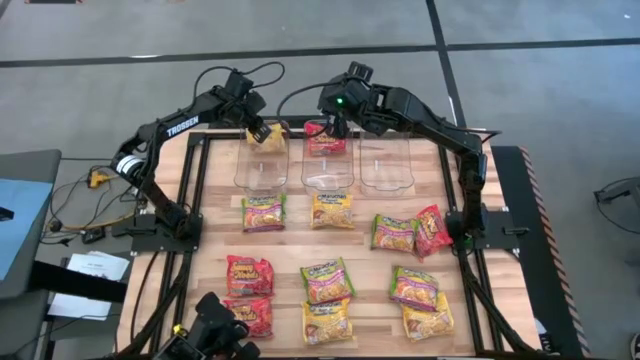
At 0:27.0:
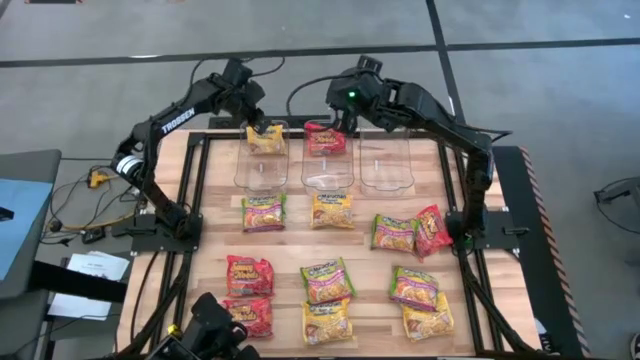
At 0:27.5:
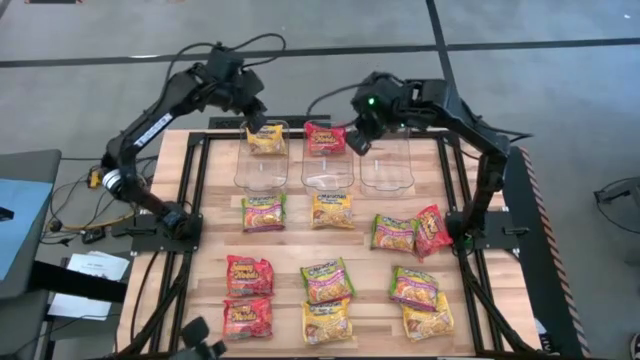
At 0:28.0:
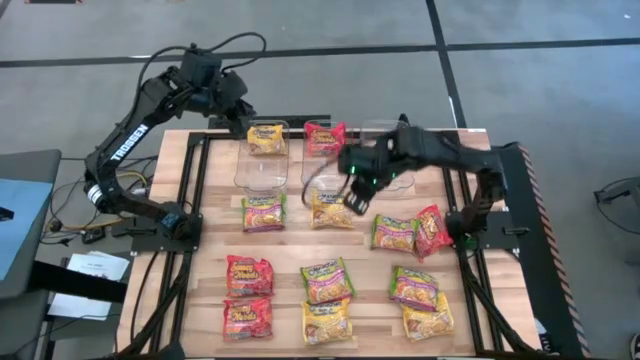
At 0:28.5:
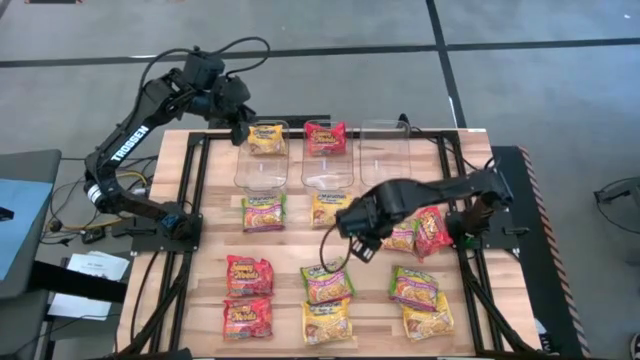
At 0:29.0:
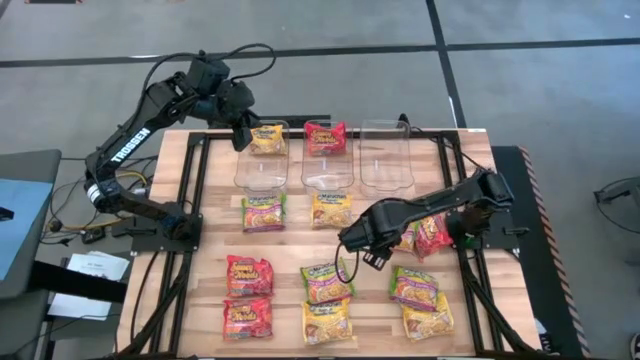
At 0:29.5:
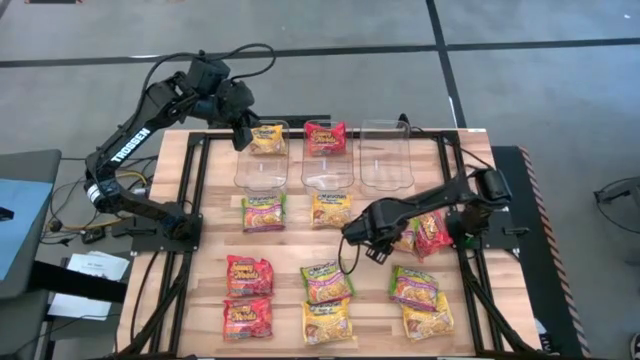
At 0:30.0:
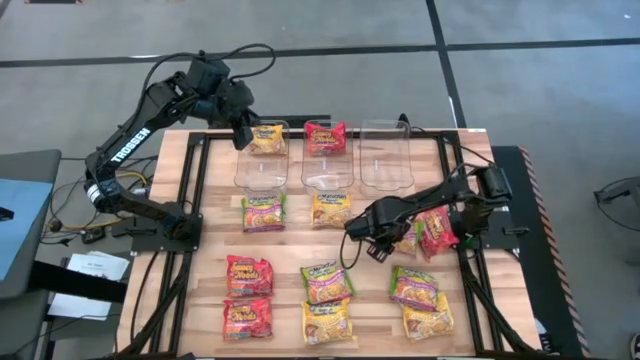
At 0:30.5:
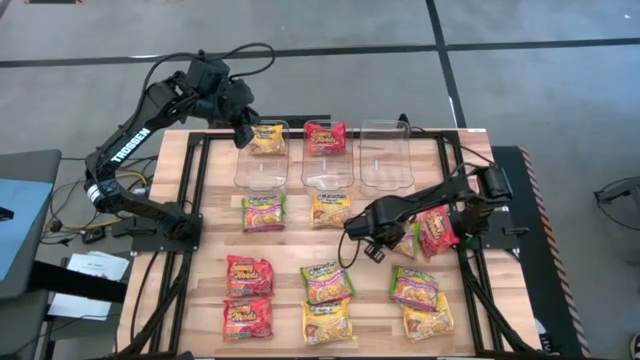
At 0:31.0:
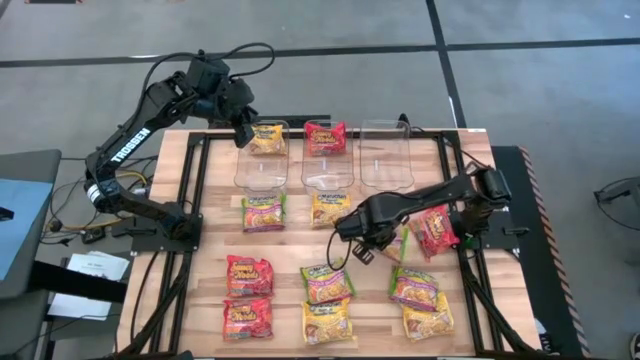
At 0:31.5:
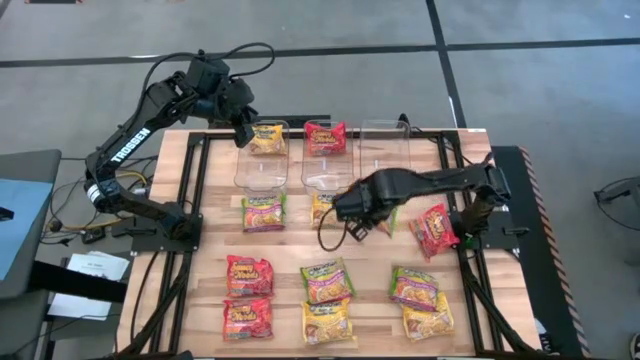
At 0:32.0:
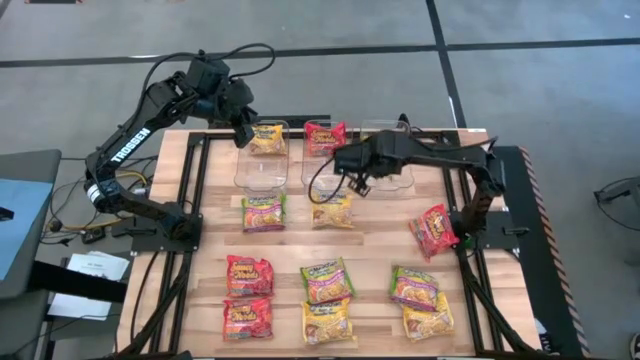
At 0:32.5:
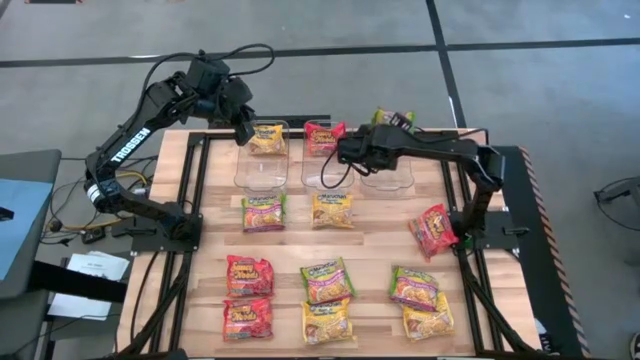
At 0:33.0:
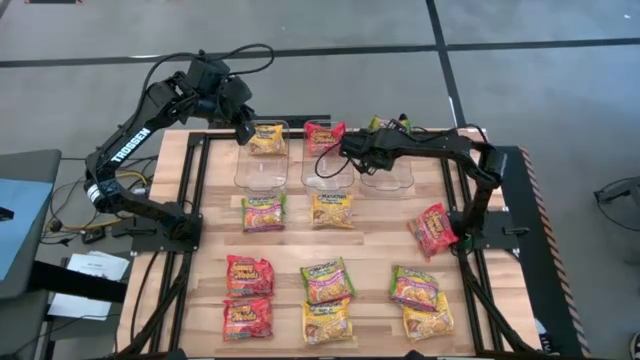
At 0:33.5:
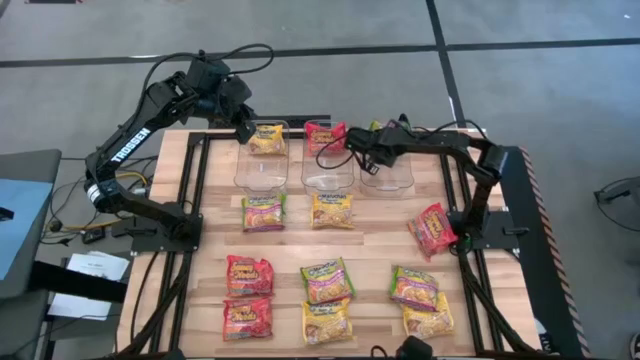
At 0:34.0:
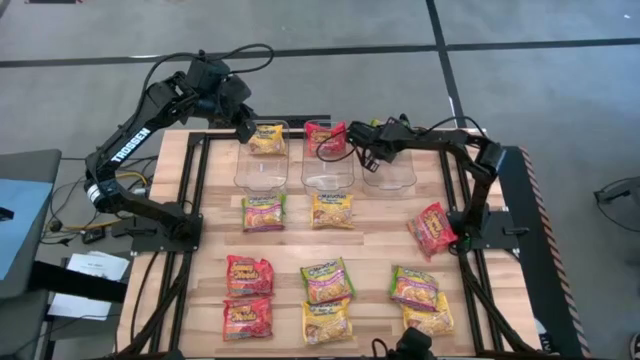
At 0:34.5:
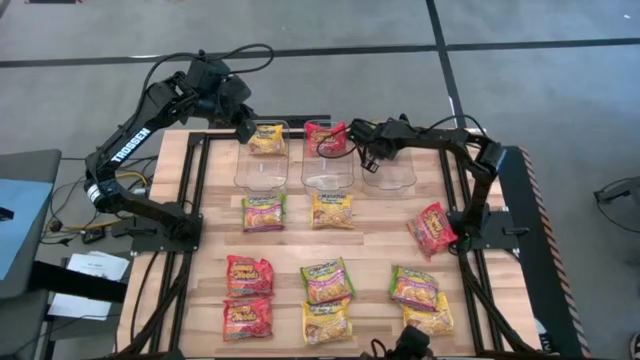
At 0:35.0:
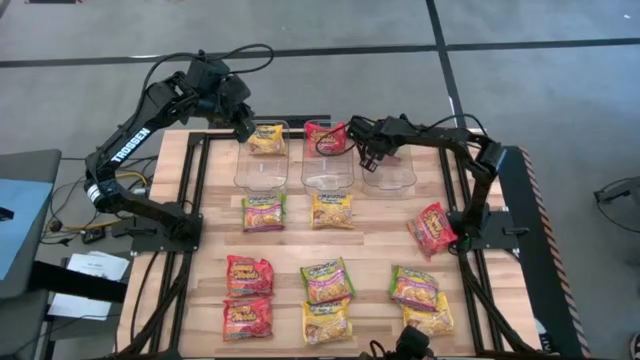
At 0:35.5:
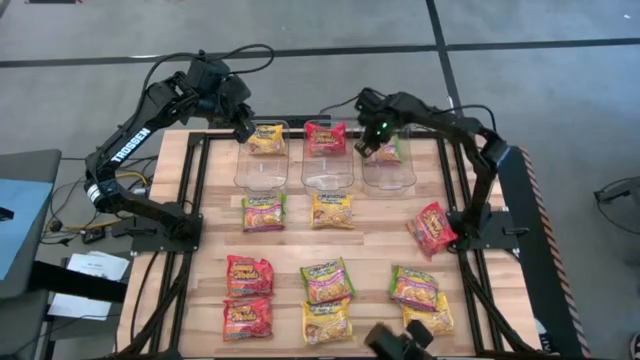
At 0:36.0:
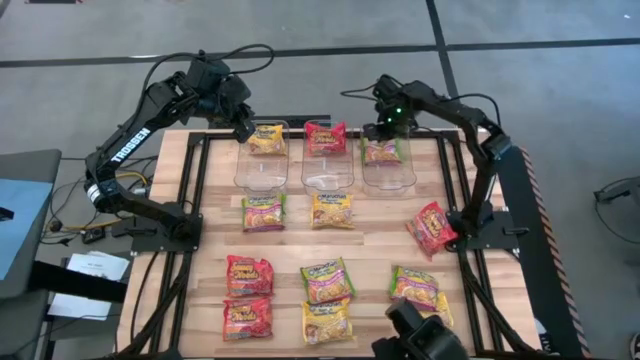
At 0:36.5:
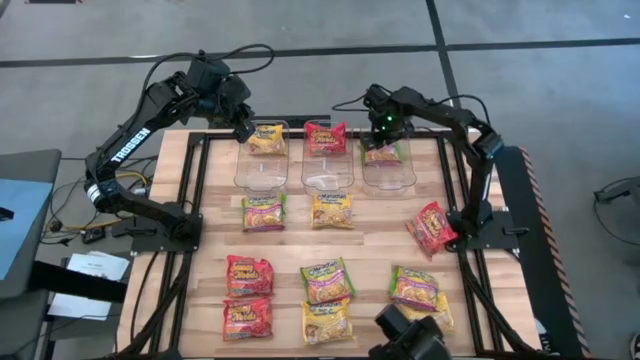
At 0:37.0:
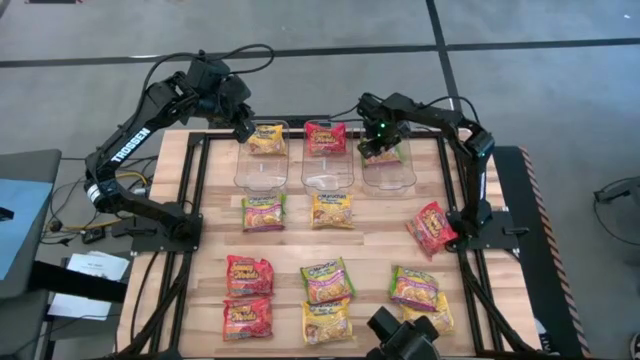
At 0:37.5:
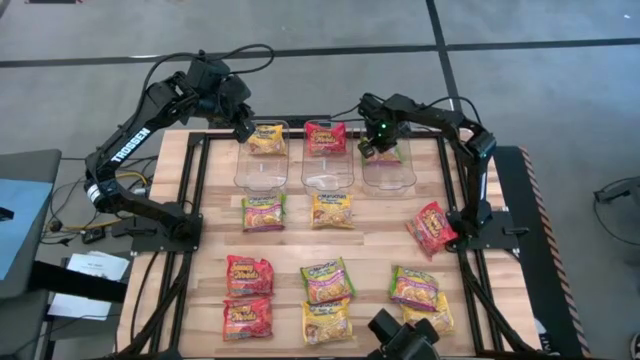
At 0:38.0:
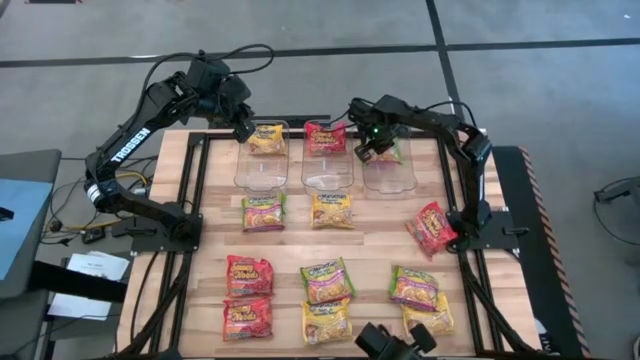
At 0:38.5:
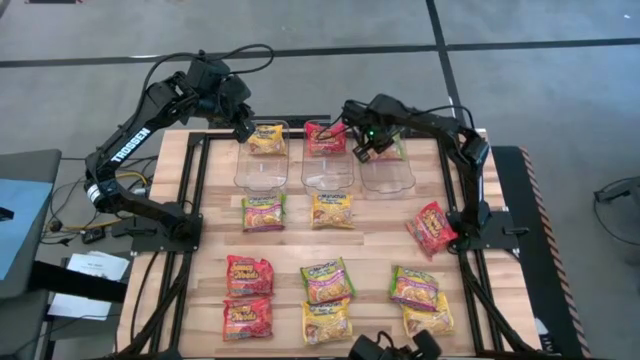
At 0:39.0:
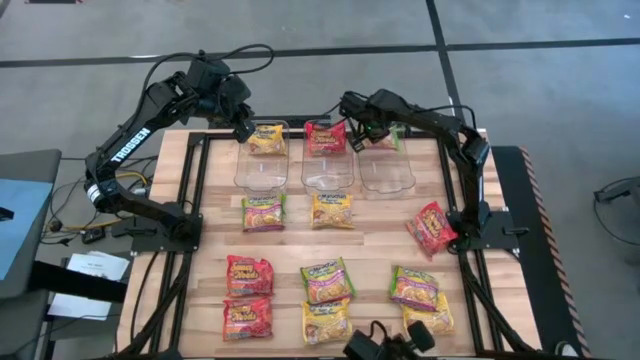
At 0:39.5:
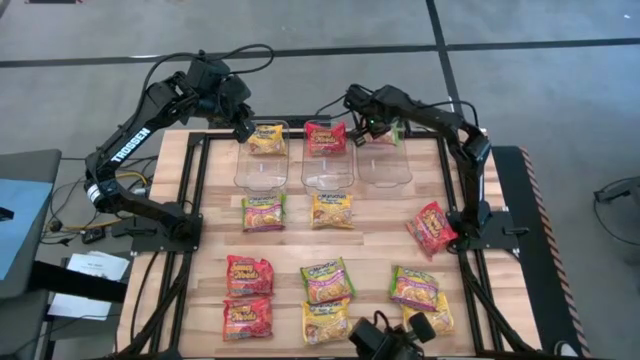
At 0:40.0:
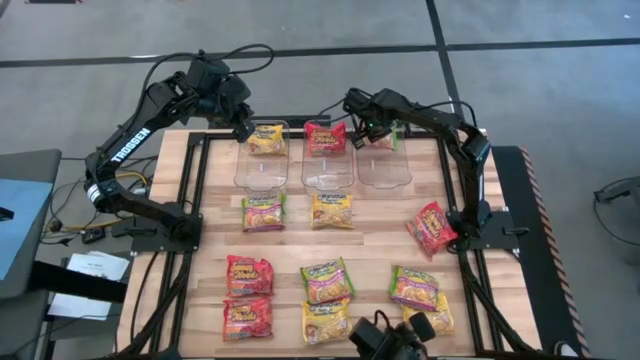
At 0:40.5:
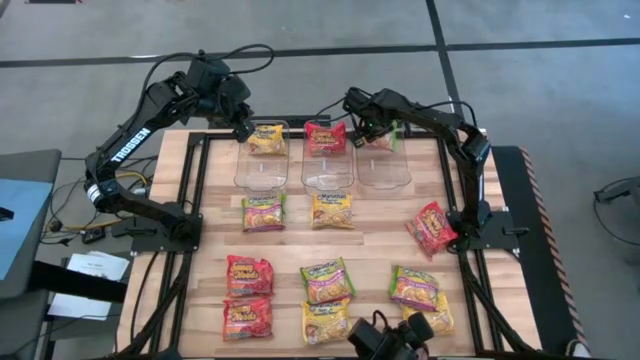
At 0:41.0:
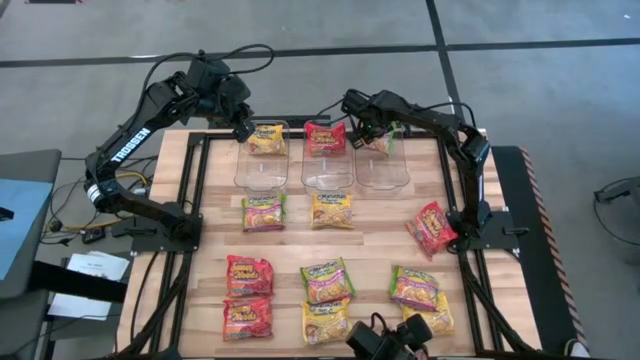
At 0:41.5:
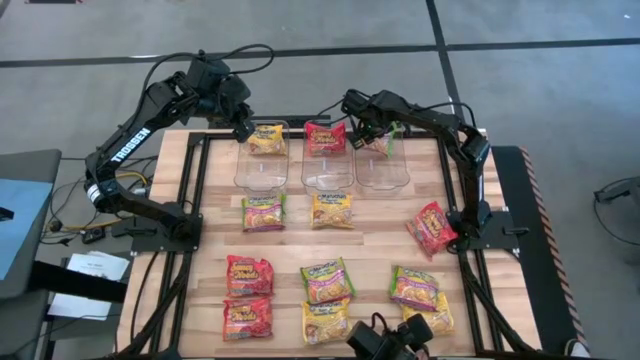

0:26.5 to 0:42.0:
Task: Sort Maruchan noodles
Put the green noodle pack into the right transparent bin

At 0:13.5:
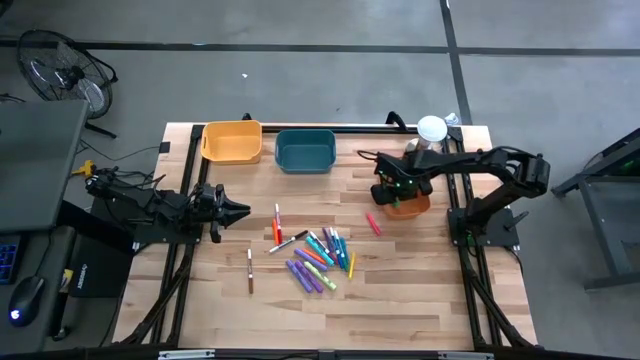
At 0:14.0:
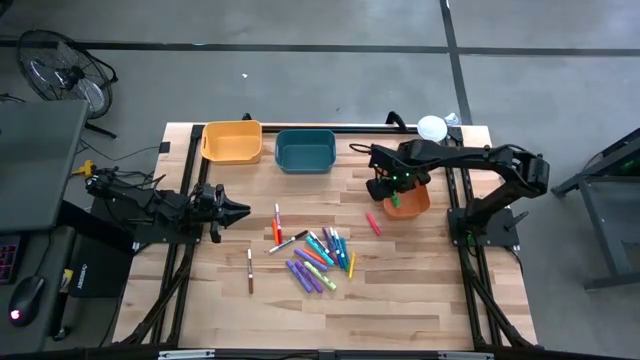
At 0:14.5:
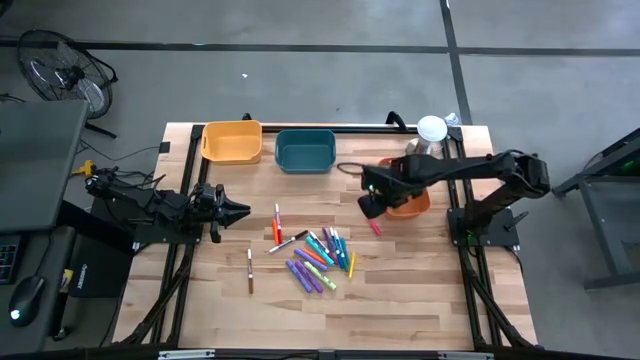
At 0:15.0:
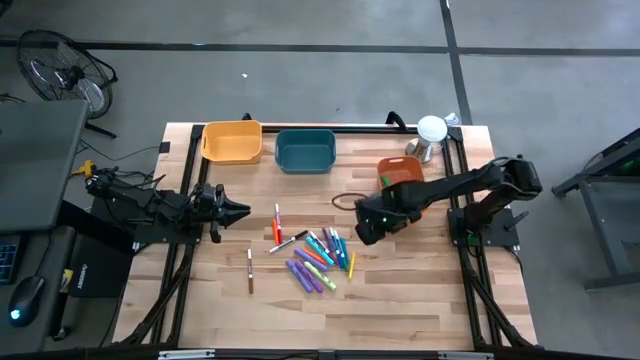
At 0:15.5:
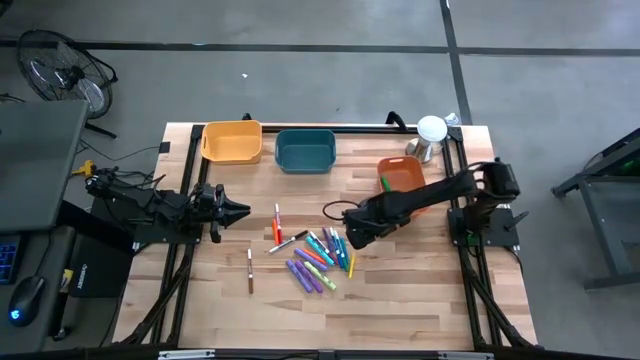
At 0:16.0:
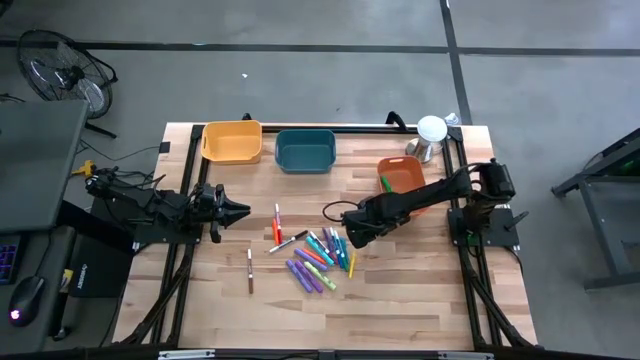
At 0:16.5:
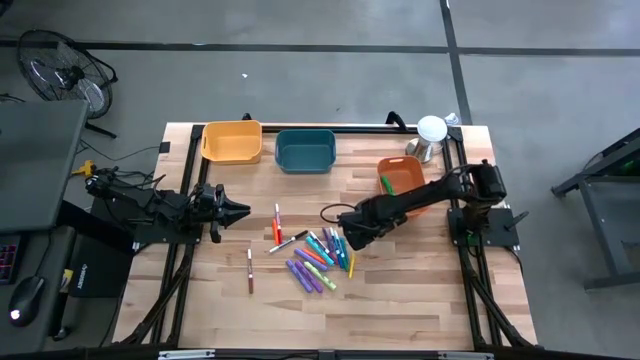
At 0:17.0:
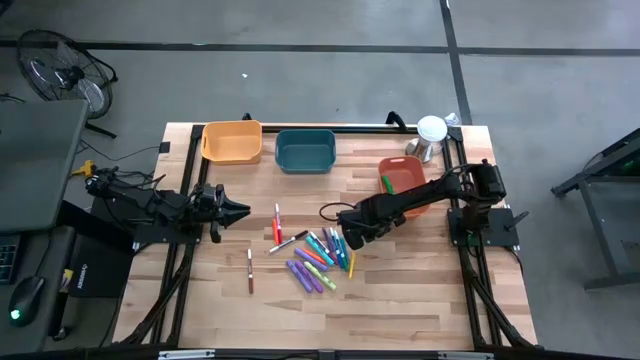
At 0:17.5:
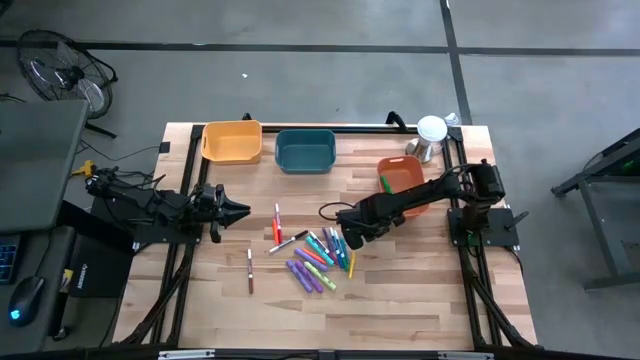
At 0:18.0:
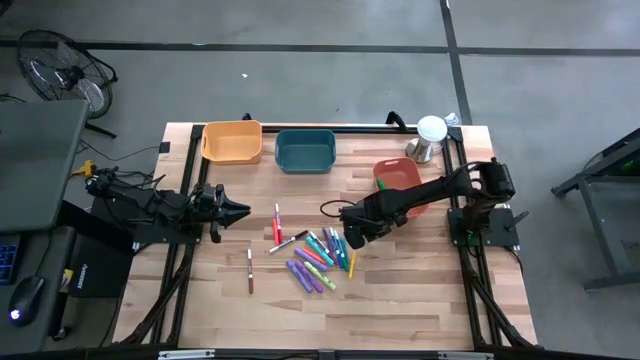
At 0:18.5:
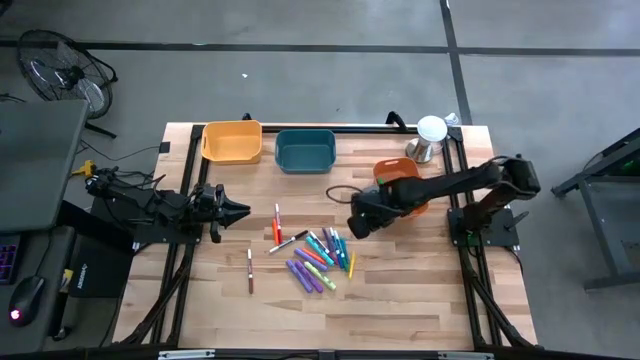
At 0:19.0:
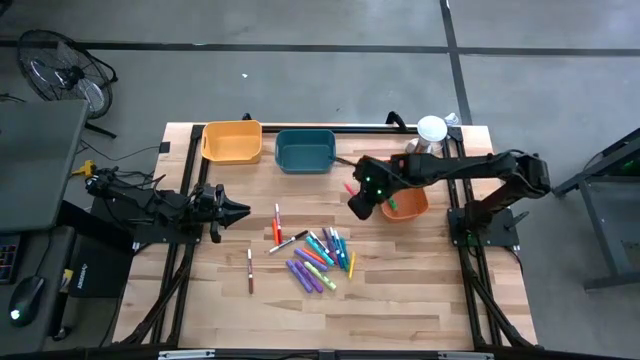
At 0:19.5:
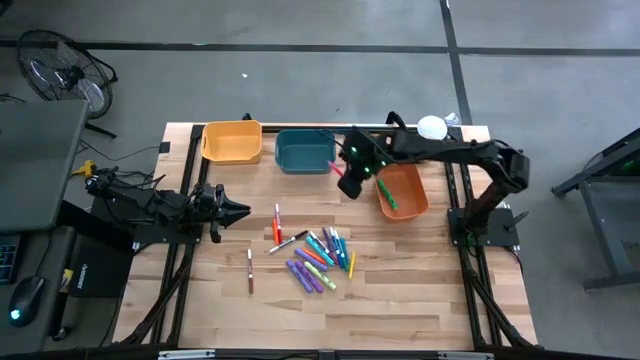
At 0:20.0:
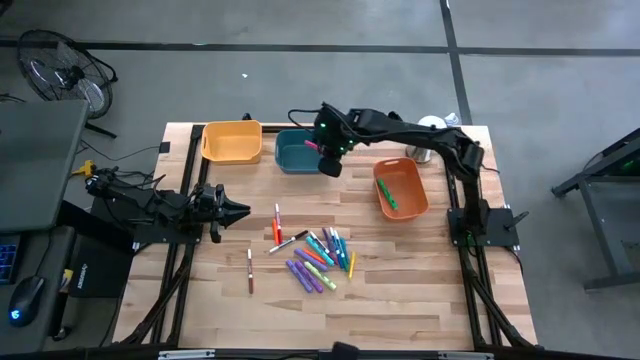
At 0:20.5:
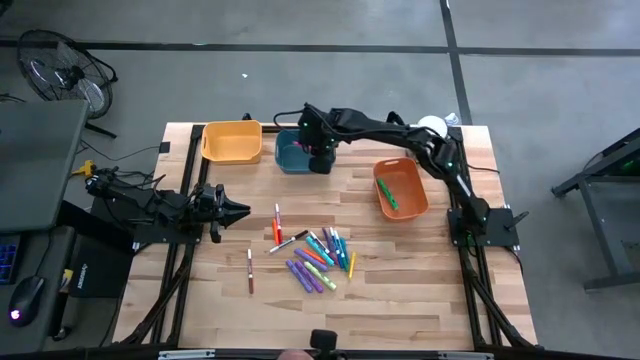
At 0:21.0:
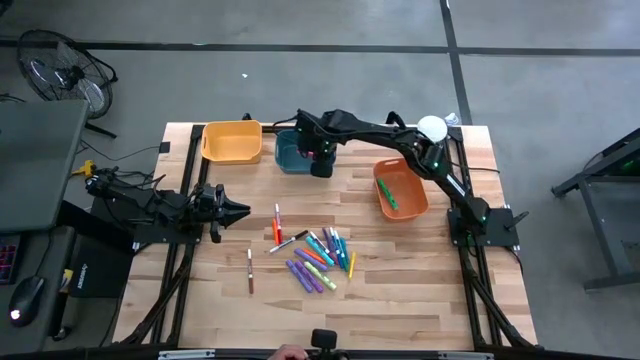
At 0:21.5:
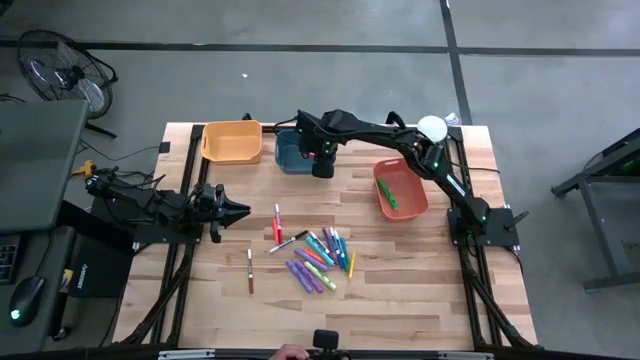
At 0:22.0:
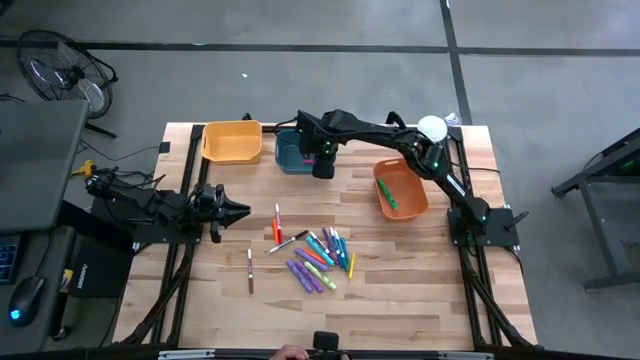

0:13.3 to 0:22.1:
Task: Pick & Place Markers
Put the pink pen into the blue bin
